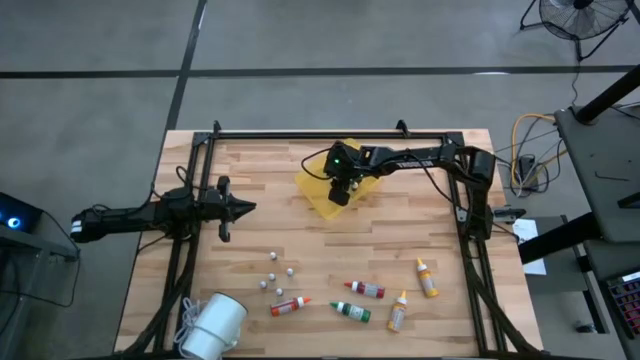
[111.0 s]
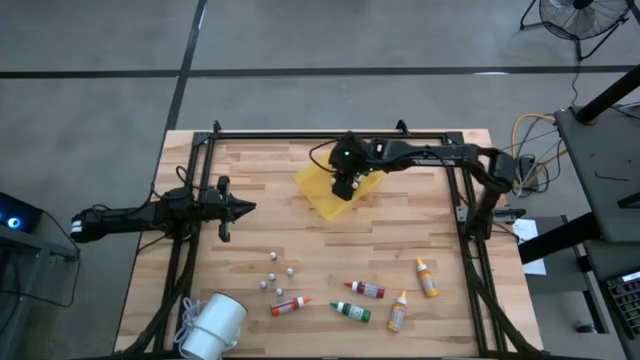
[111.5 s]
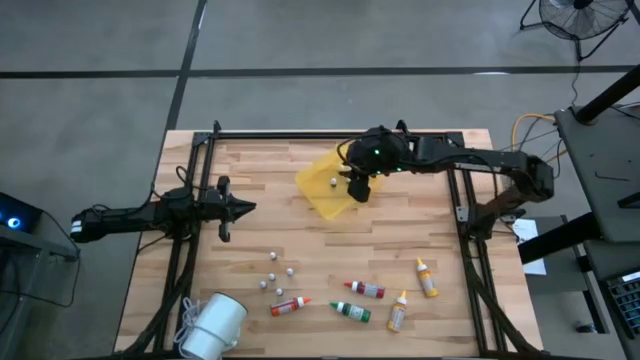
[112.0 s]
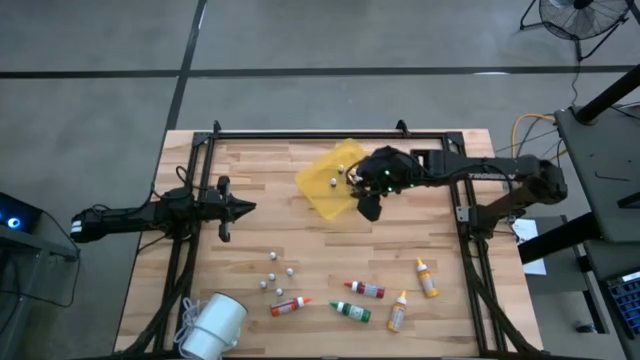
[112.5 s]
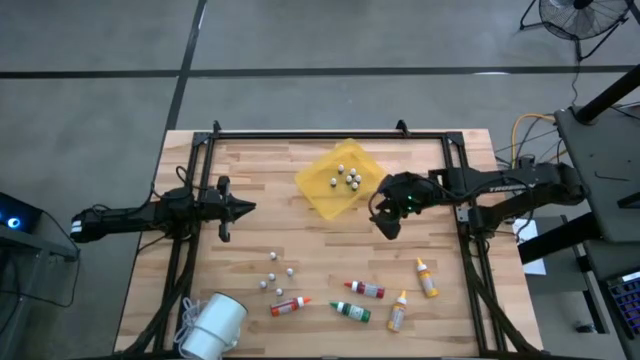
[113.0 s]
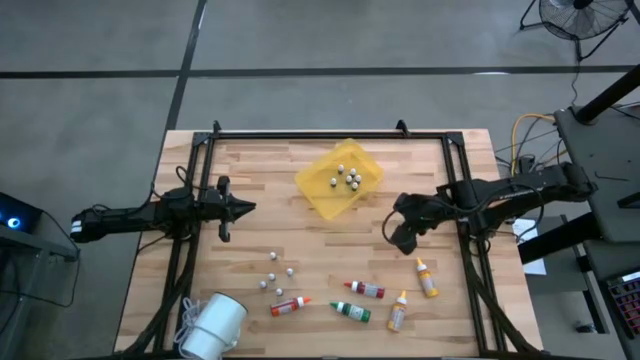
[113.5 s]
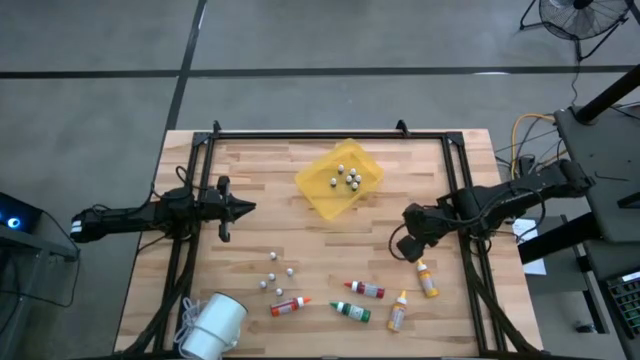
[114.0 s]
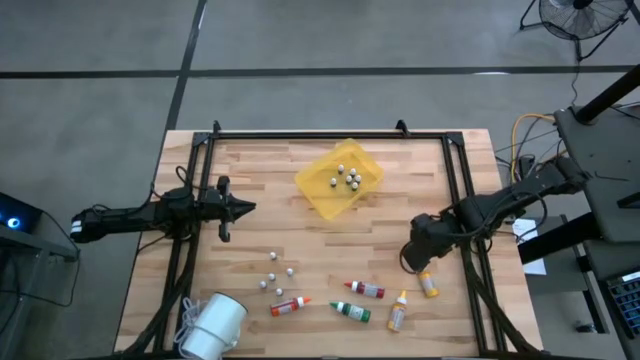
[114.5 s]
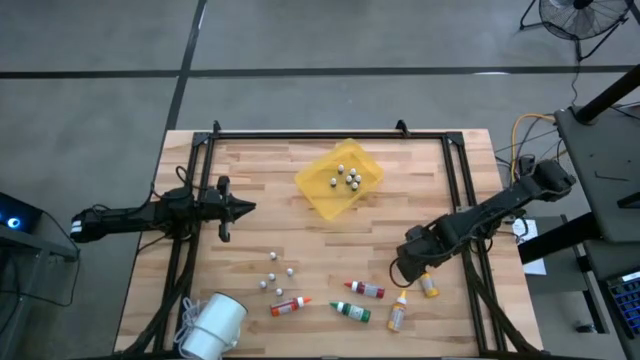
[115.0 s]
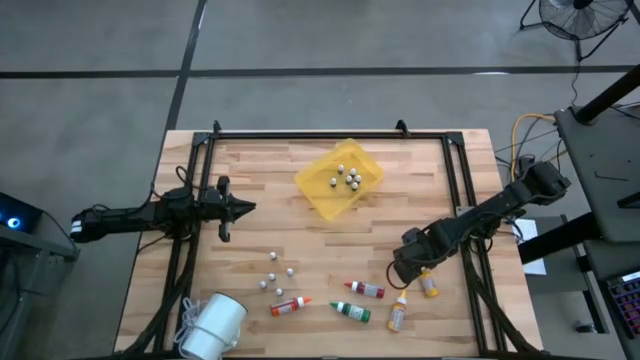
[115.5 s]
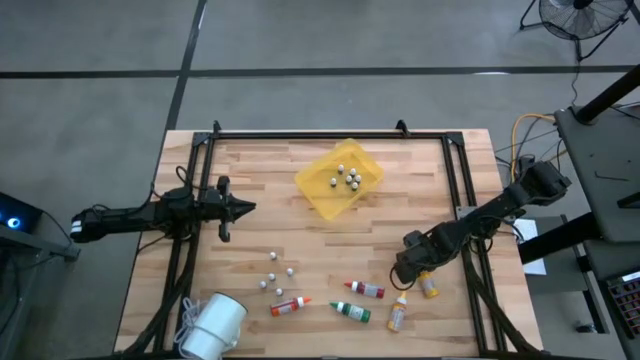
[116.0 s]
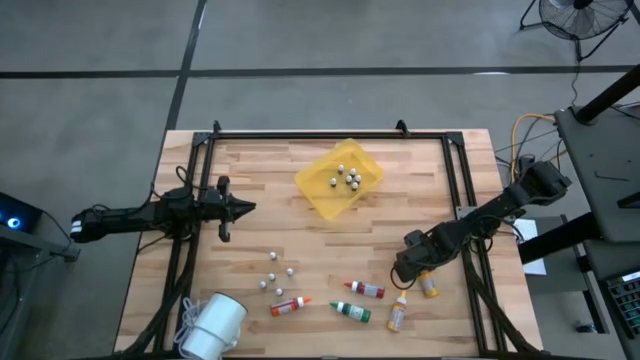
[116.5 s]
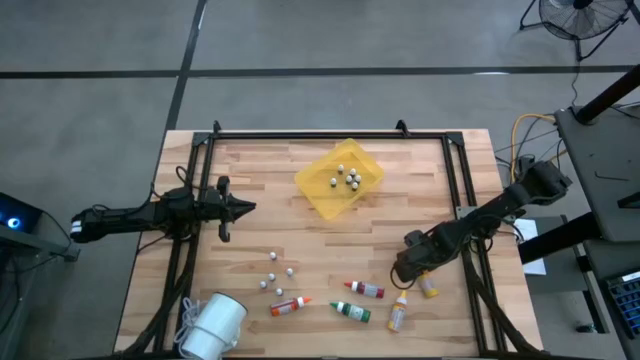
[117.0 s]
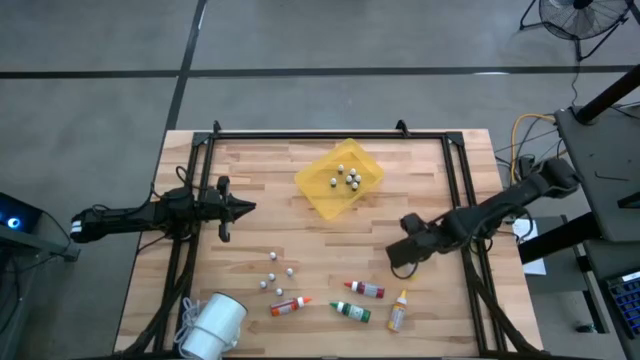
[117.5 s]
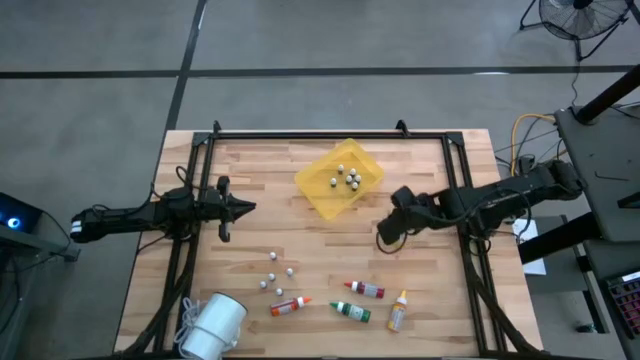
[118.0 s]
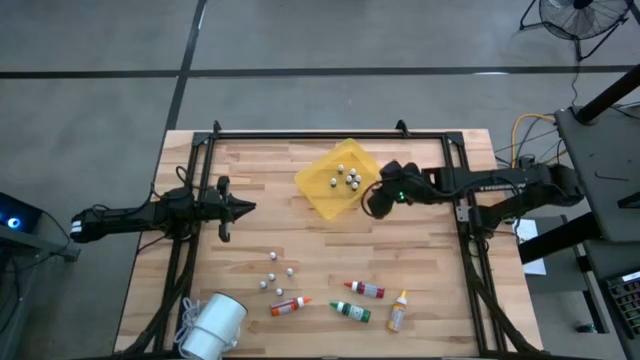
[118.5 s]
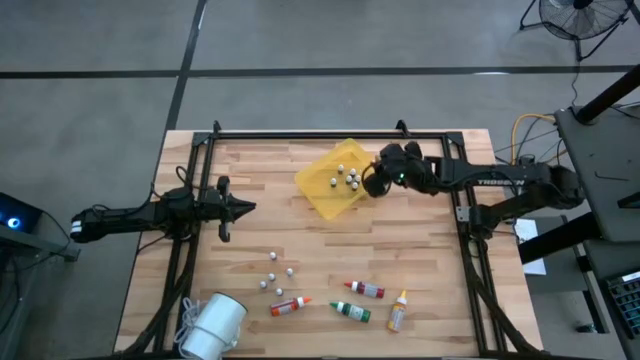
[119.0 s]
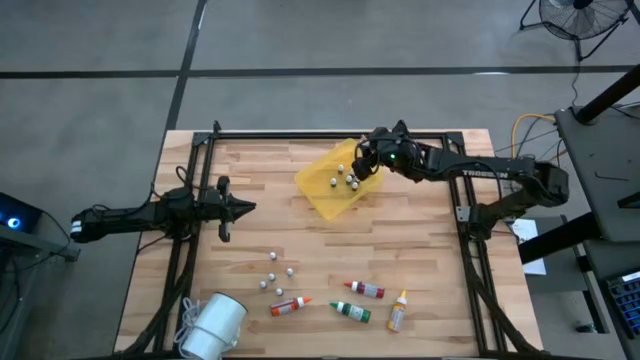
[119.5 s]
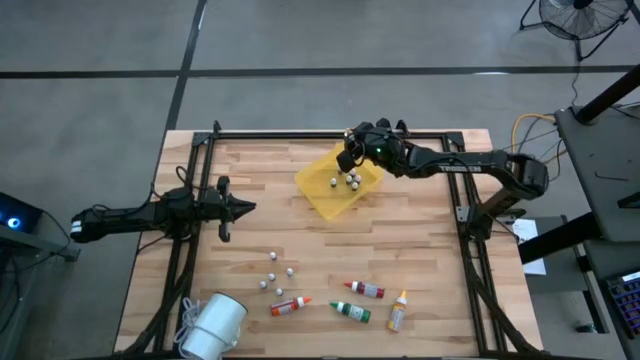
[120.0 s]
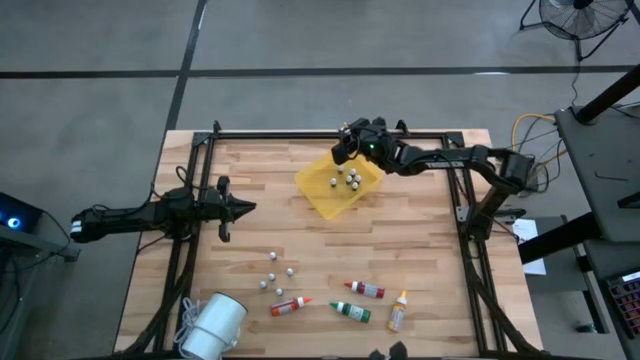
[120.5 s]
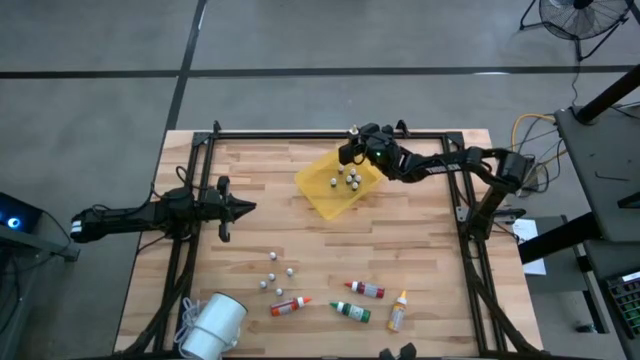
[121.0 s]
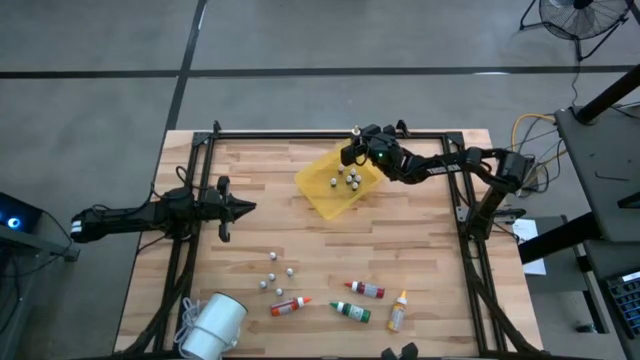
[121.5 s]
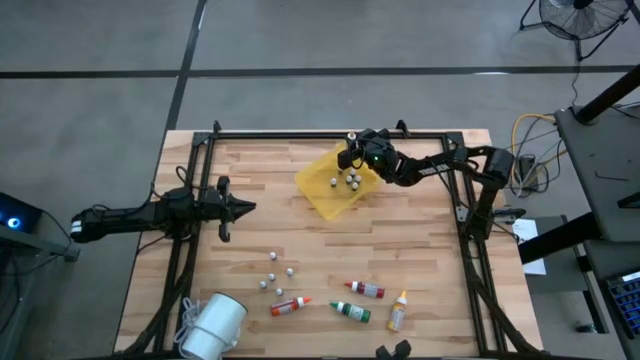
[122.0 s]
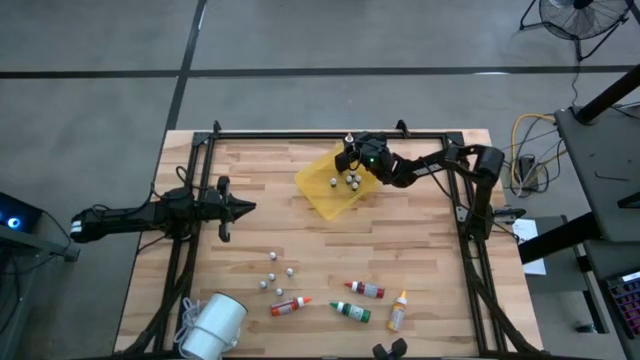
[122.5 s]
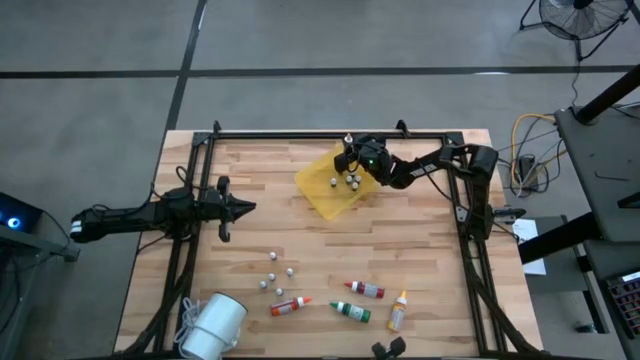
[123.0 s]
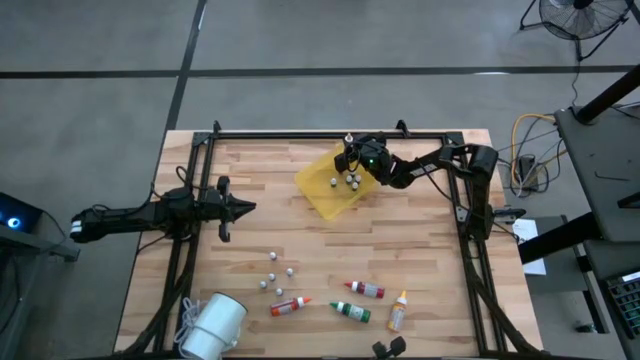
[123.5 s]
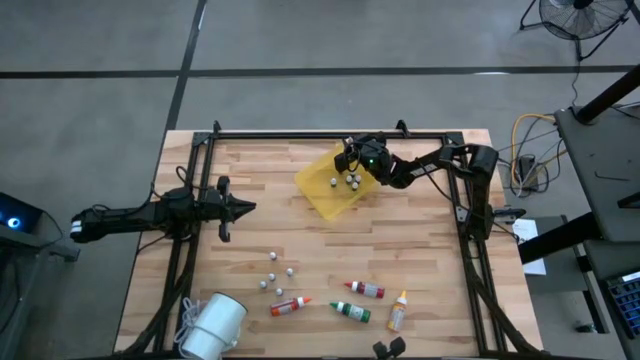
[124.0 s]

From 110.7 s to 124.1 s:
Task: Pick & Place food coloring
Put the large yellow food coloring bottle into the yellow bin
